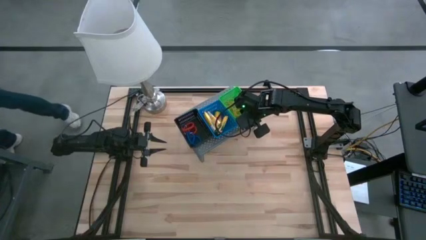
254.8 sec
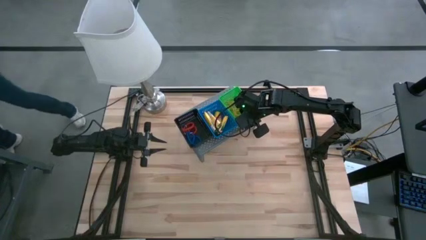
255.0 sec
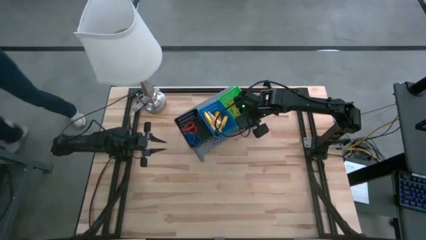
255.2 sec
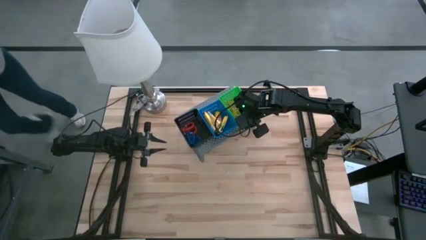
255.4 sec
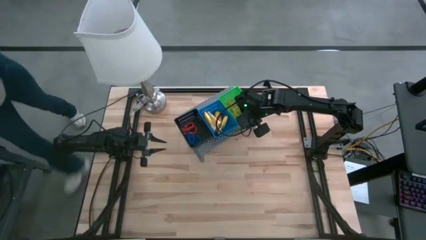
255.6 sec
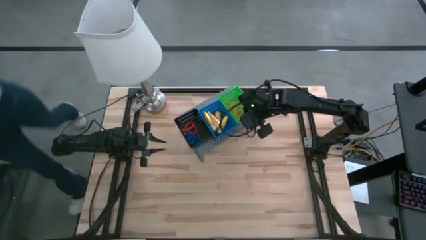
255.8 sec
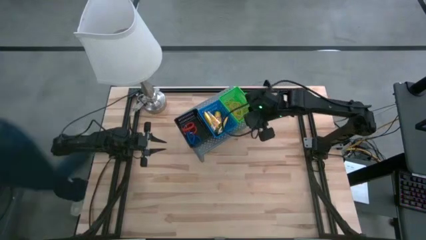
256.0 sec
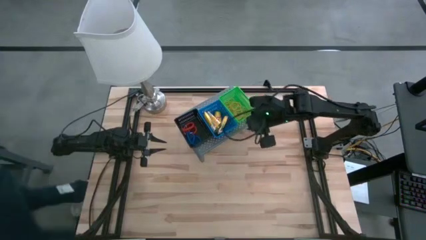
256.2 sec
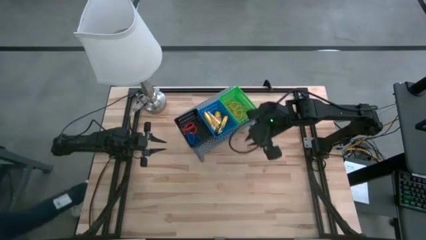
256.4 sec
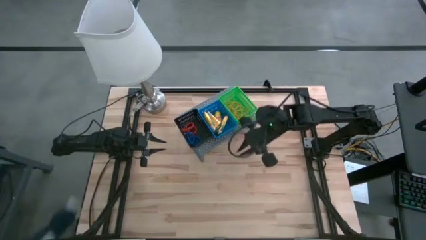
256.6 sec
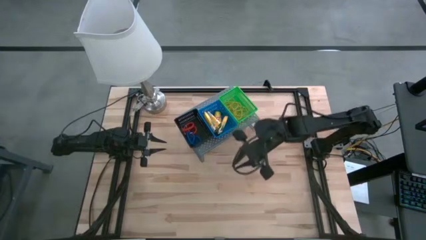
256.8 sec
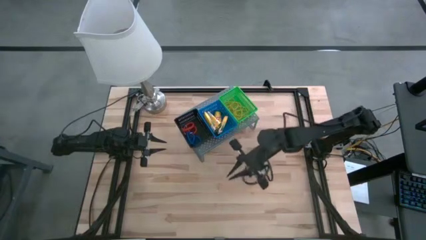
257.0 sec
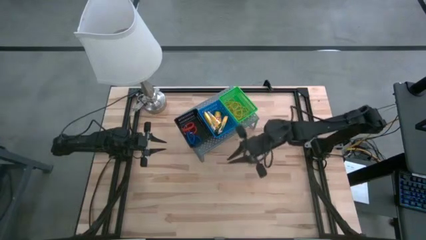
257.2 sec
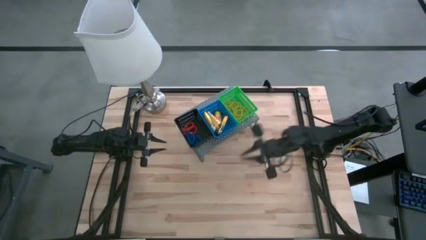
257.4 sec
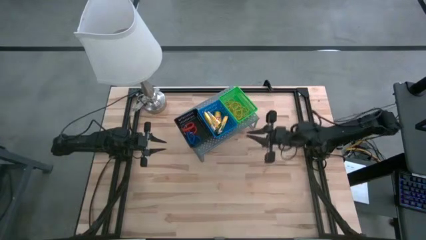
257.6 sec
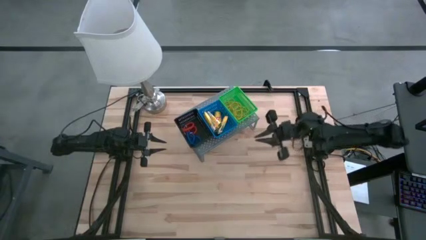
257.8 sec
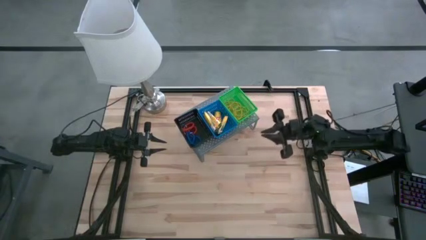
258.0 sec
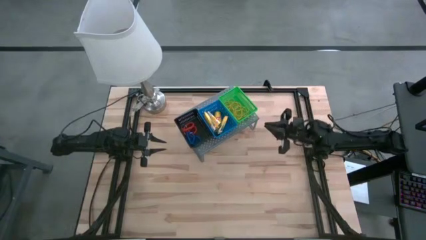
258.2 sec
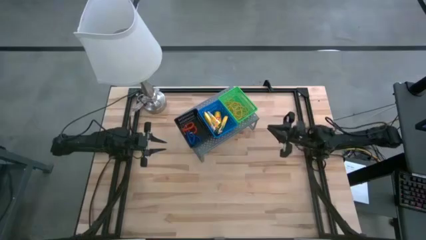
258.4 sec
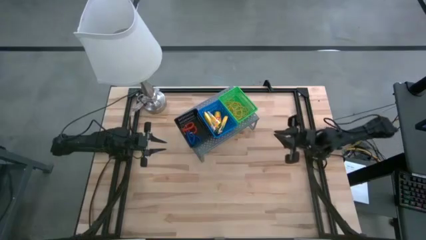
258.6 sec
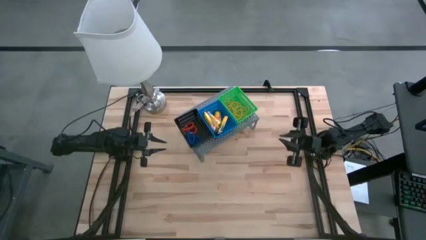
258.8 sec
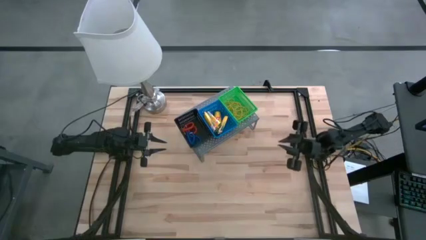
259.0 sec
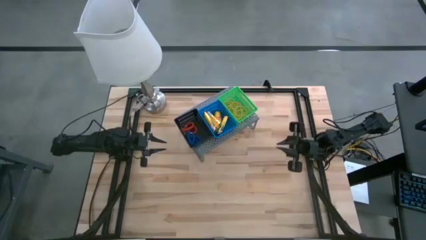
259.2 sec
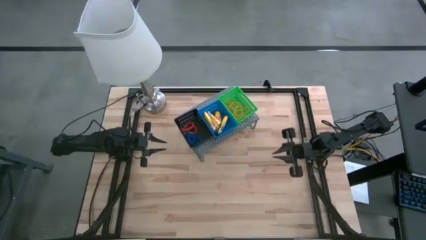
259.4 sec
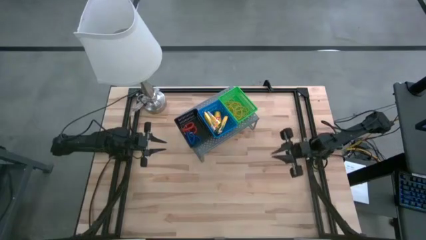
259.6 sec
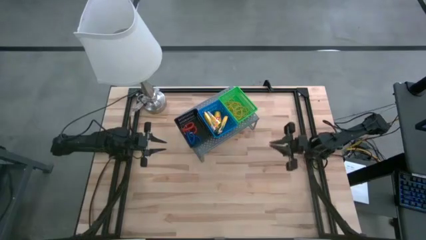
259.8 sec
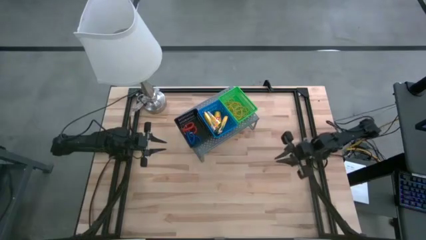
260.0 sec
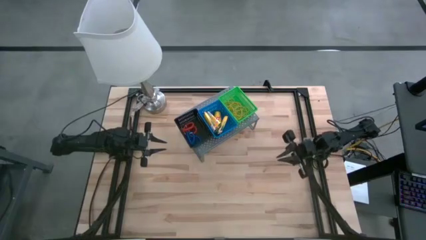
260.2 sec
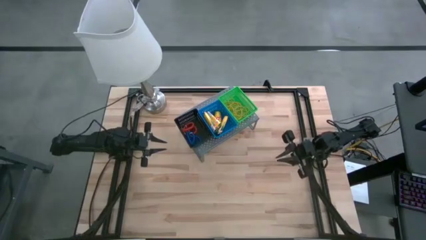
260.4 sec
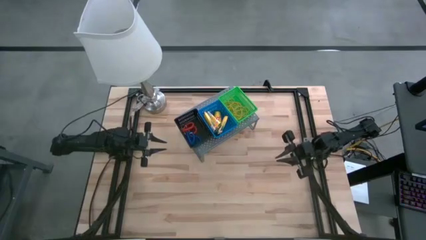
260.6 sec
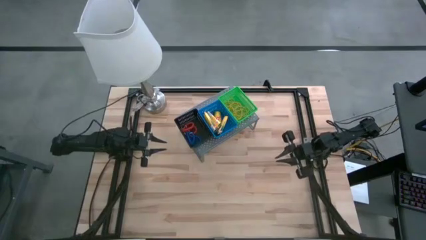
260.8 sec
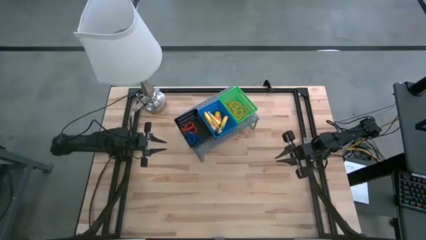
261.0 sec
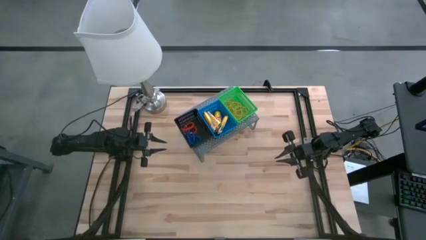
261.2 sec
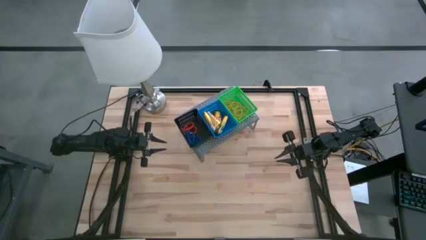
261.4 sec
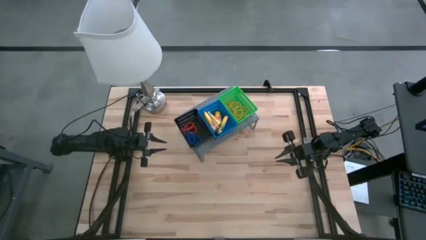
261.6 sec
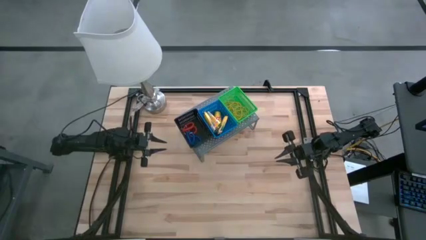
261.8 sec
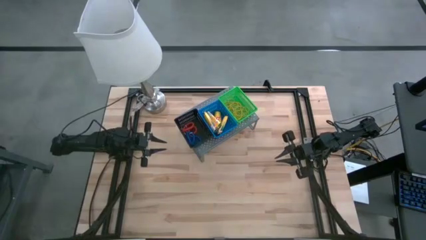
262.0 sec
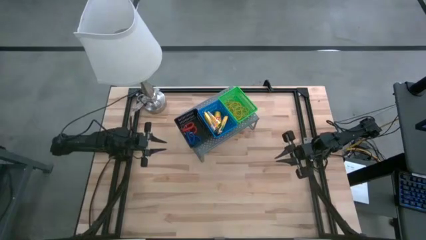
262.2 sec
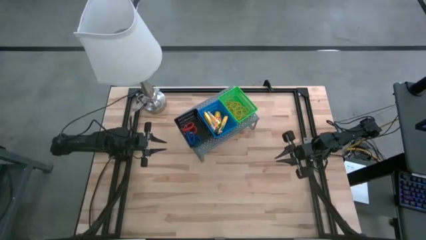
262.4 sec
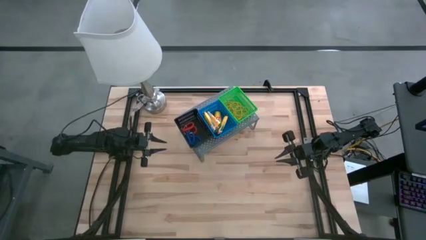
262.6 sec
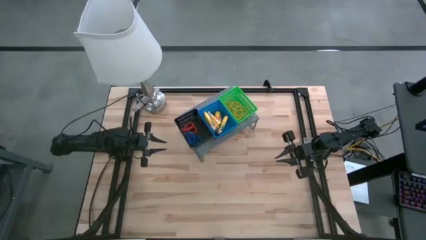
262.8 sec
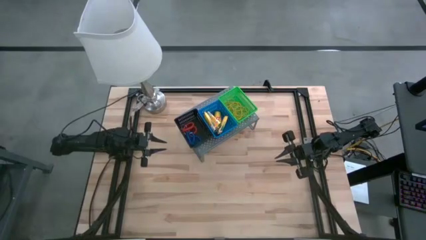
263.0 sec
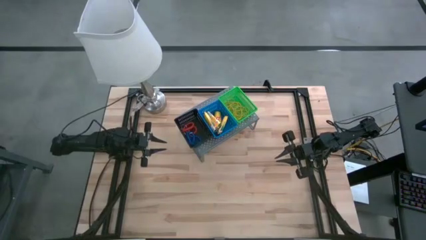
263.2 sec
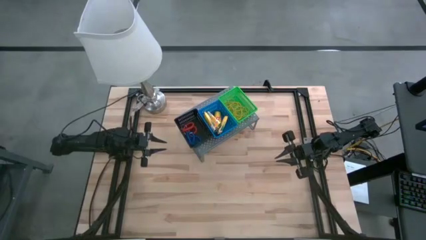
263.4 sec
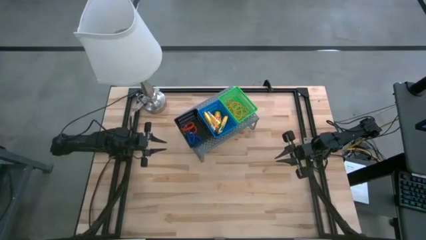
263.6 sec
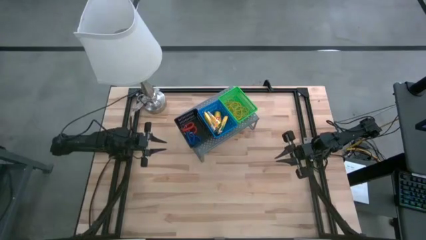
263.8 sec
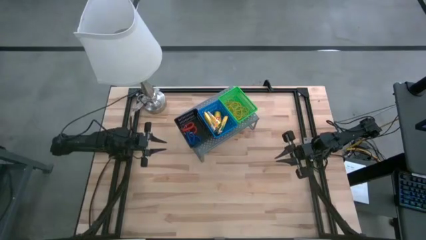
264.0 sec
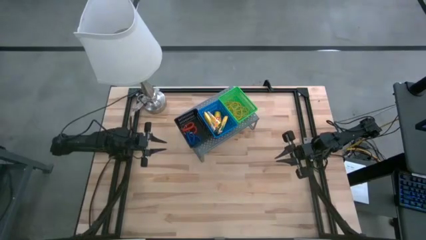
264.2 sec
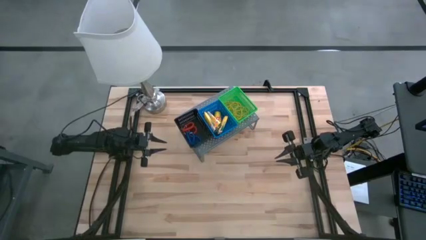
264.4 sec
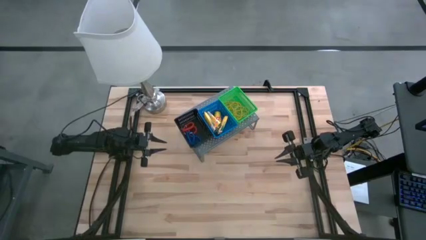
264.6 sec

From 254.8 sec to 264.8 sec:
Task: Pick & Place Office Desk Supplies
Return to Home Position
